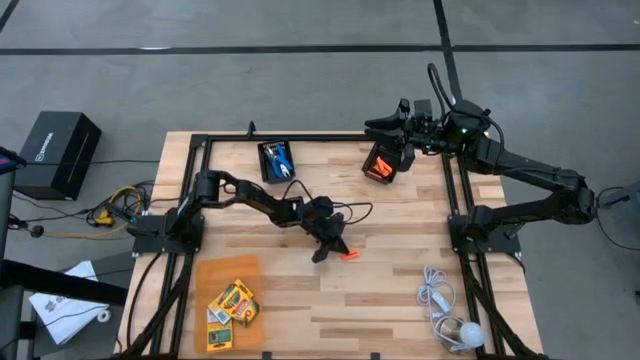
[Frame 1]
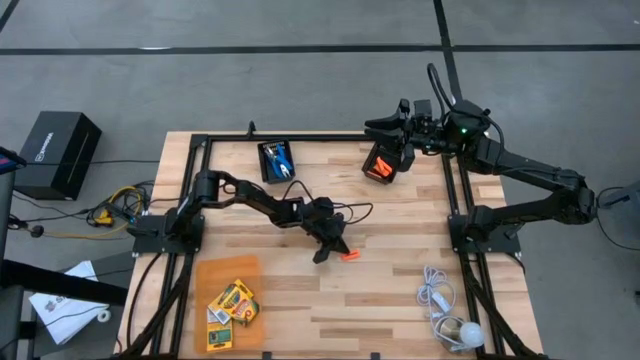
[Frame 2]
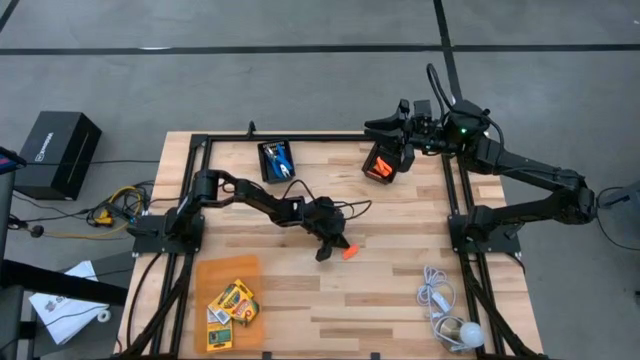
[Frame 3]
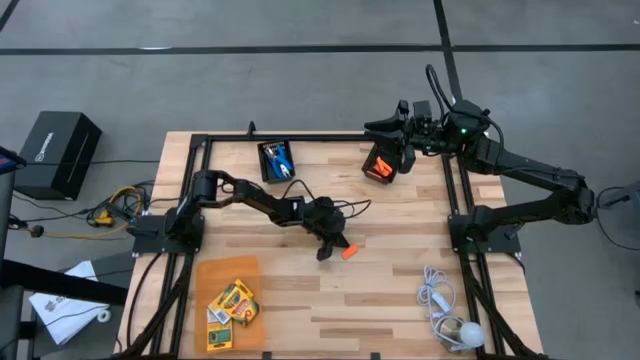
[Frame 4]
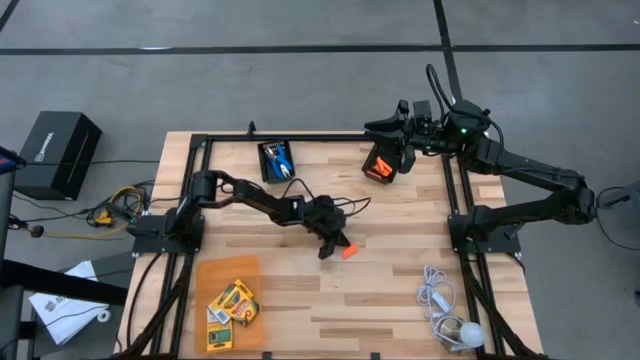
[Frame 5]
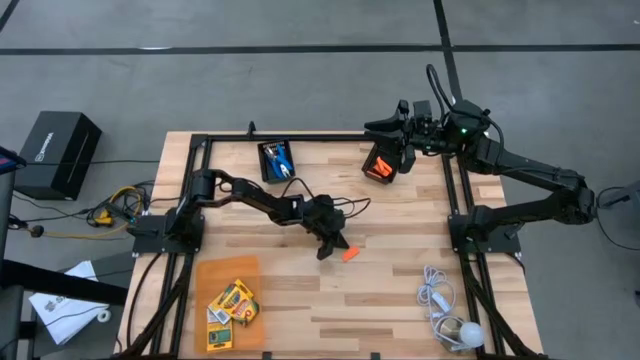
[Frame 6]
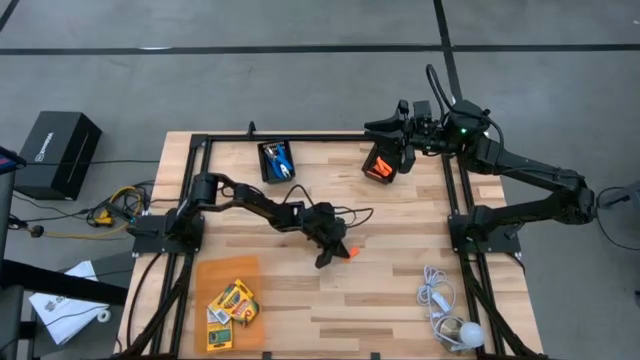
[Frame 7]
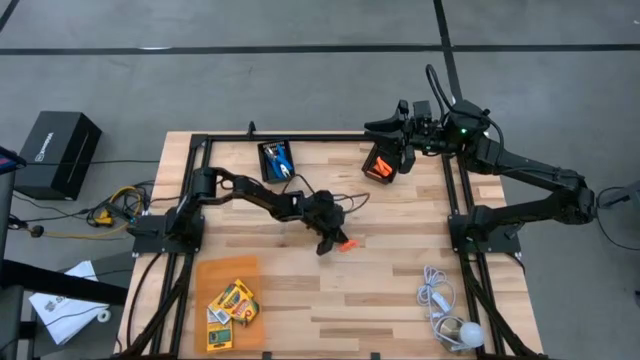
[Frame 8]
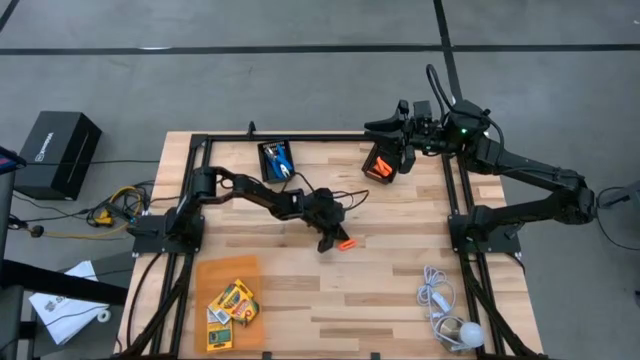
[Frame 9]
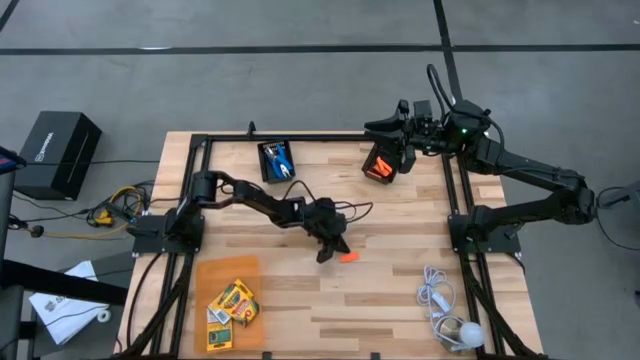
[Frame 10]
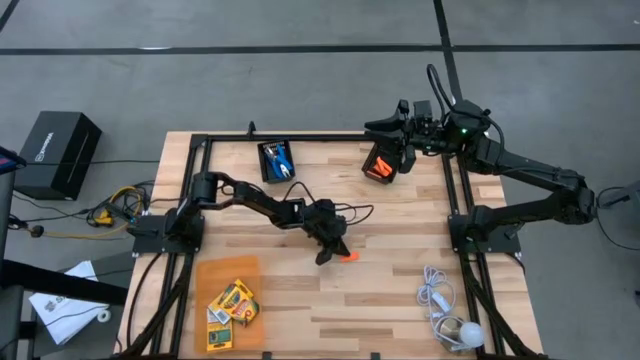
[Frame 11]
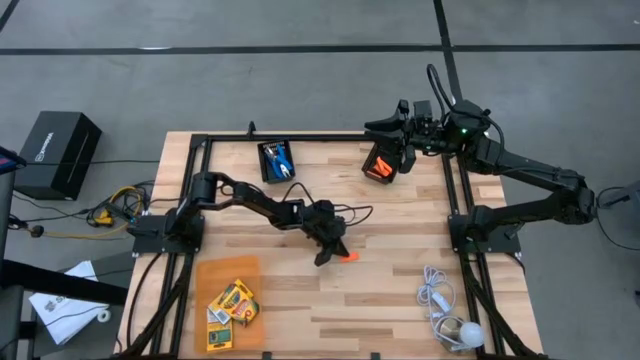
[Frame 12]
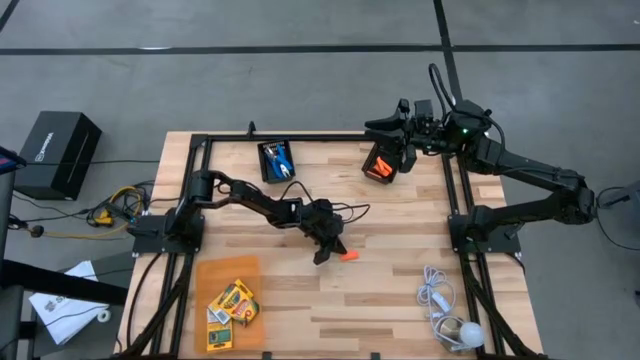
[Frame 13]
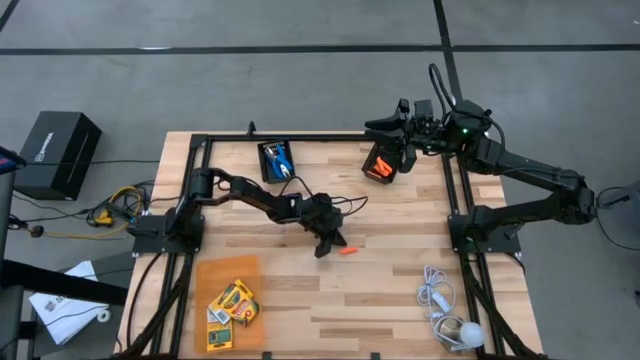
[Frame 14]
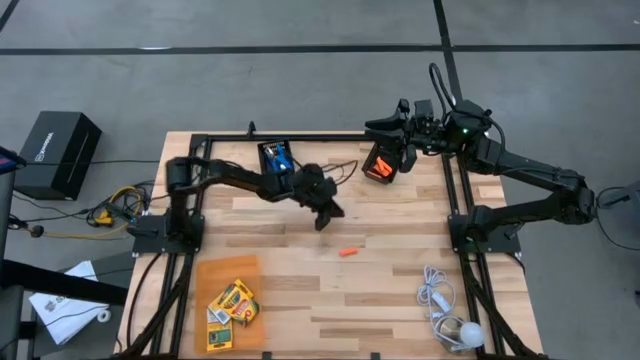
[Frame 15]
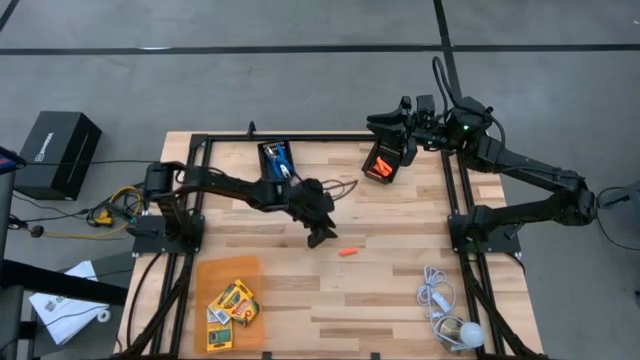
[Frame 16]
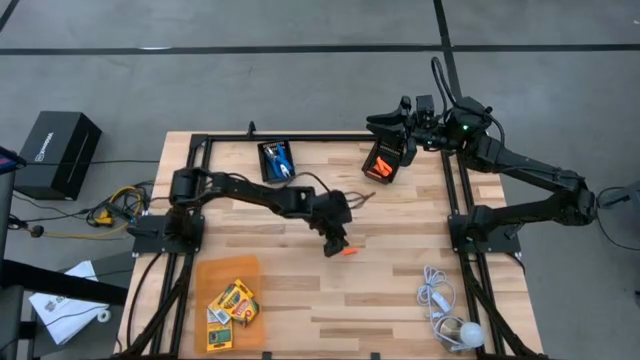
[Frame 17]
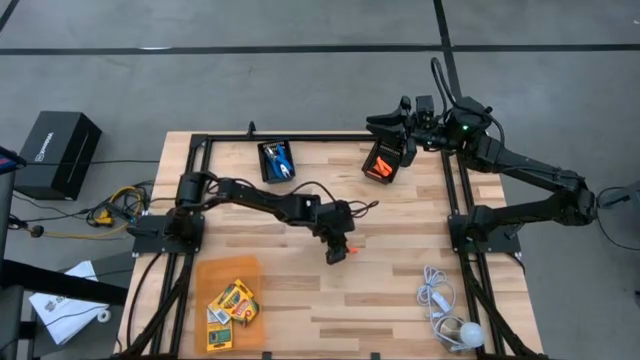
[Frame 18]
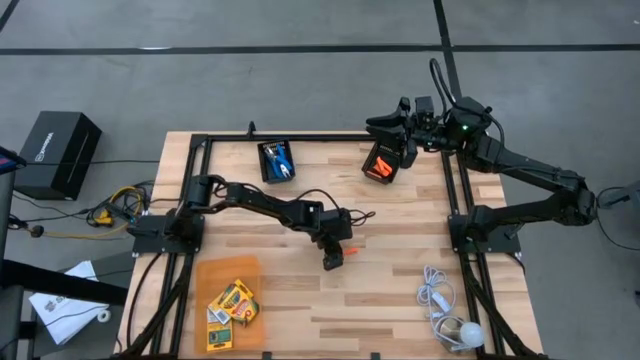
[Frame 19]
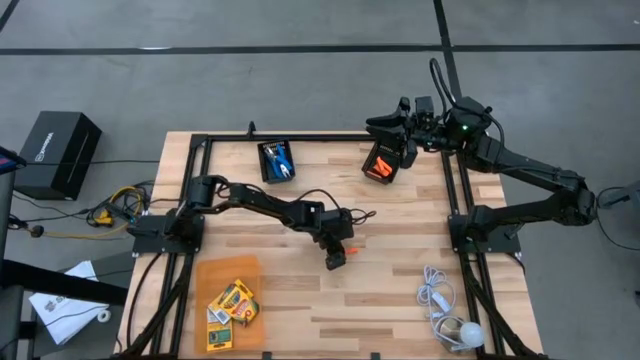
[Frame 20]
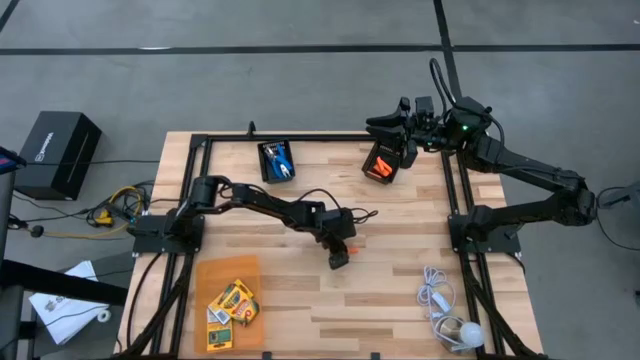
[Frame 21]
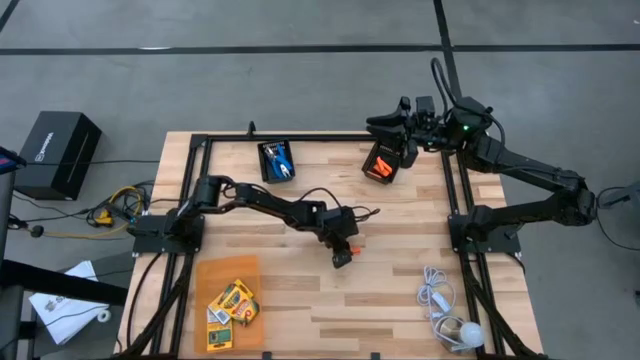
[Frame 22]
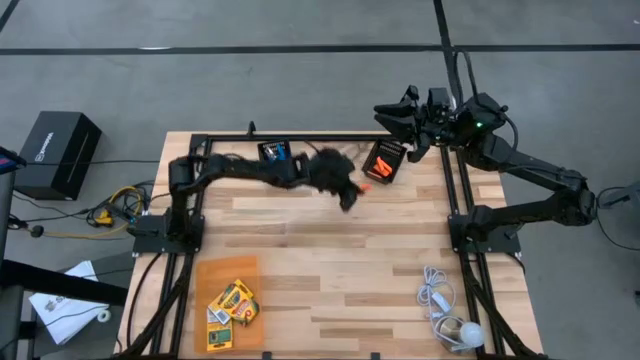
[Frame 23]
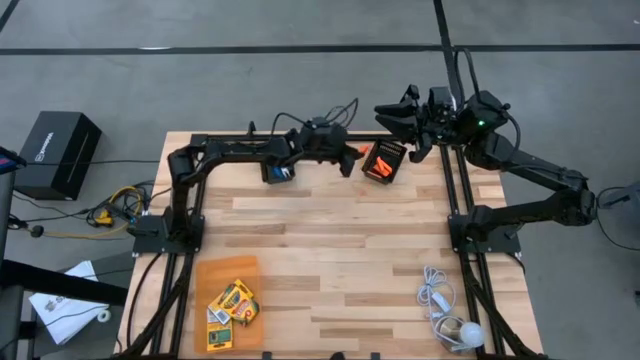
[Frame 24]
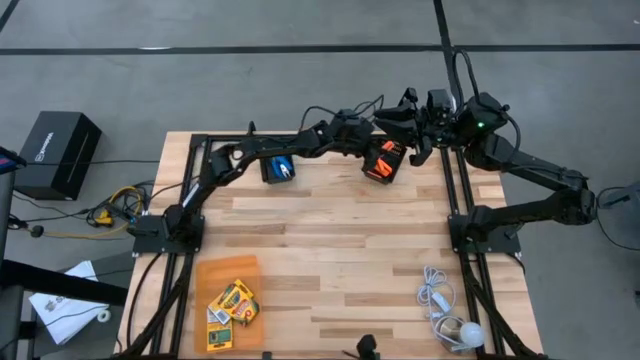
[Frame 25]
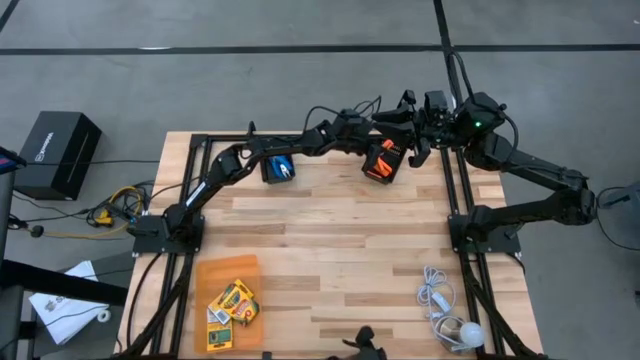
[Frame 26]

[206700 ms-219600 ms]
Task: Pick & Place School Supplies
Put the orange eraser into the right black bin

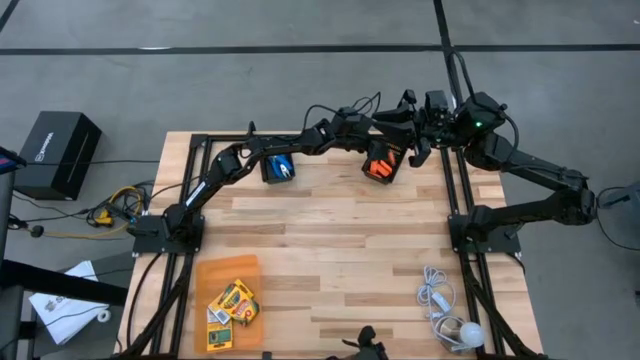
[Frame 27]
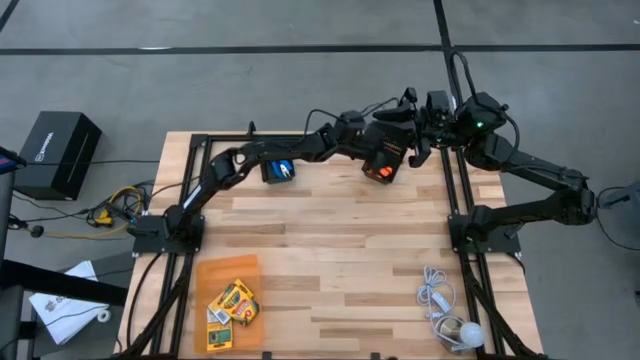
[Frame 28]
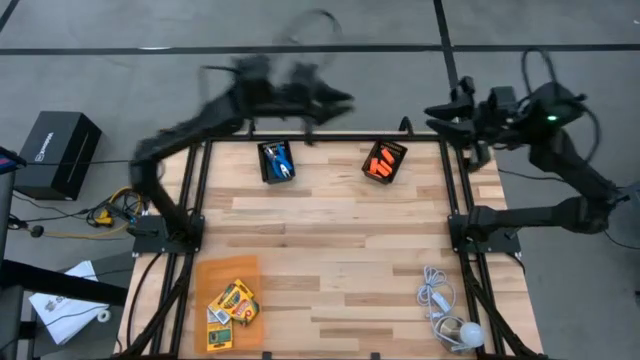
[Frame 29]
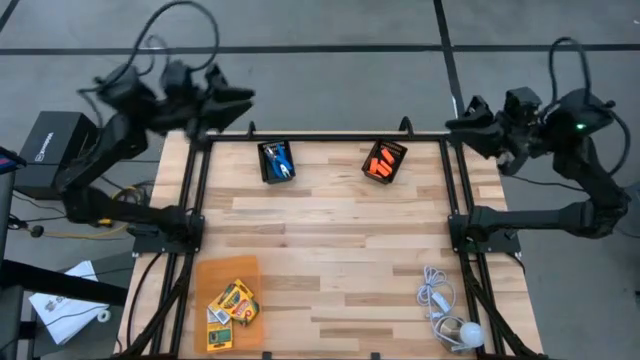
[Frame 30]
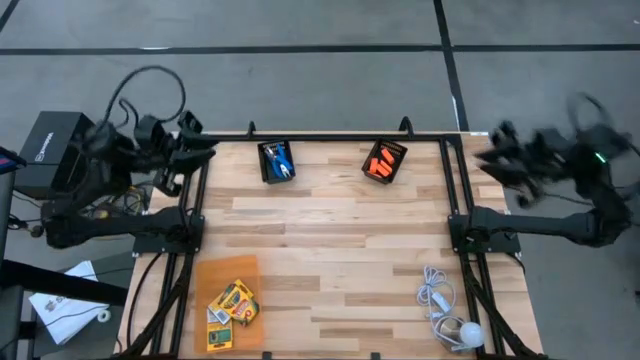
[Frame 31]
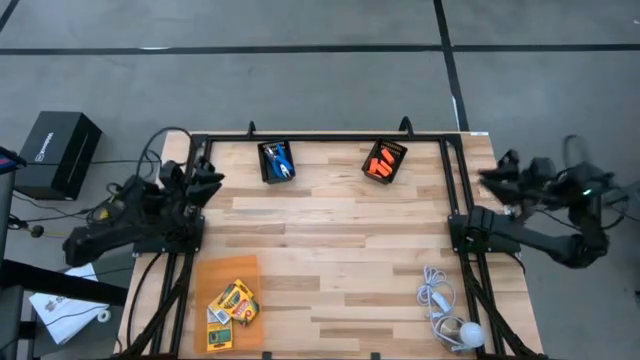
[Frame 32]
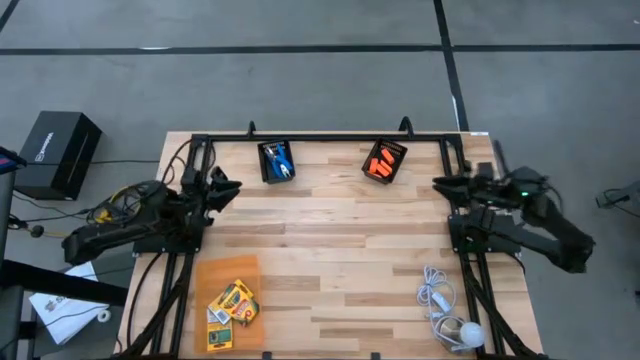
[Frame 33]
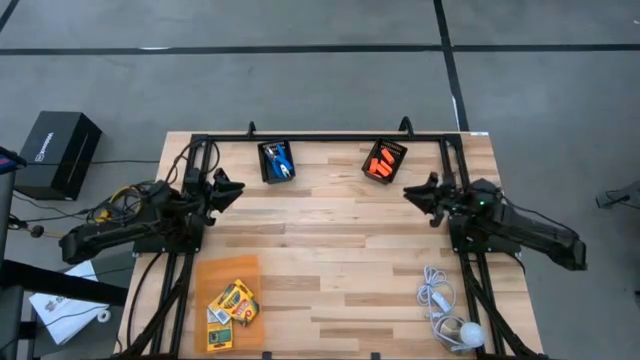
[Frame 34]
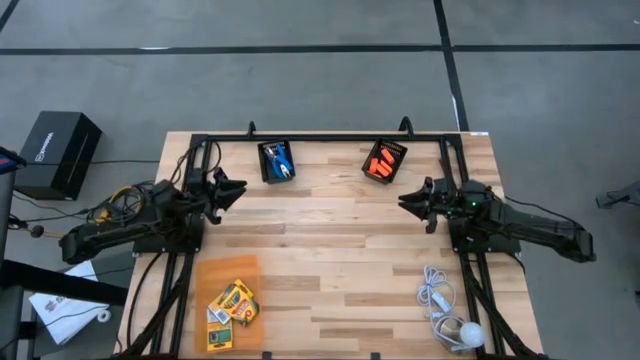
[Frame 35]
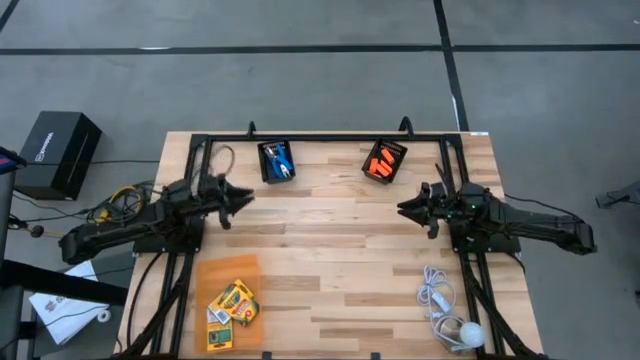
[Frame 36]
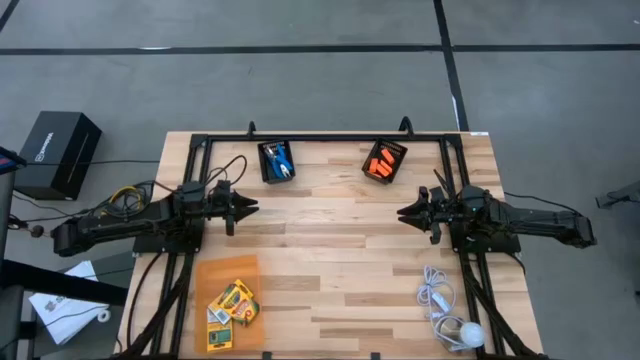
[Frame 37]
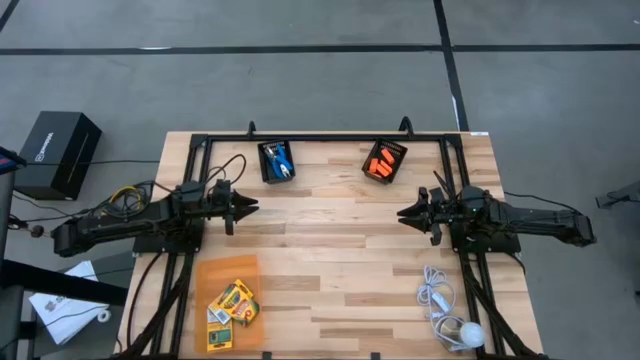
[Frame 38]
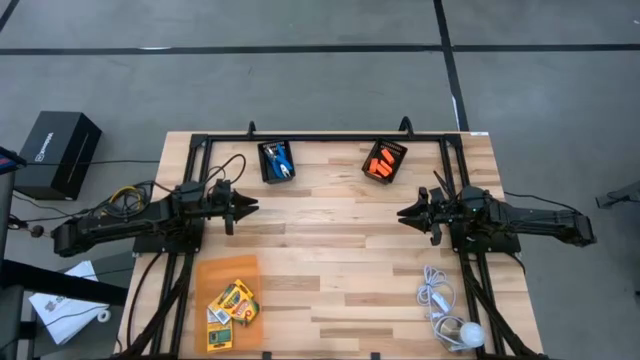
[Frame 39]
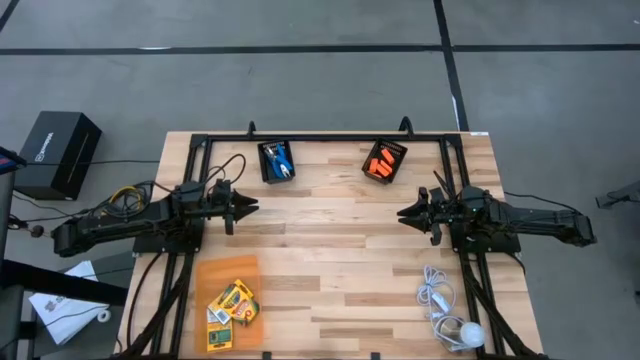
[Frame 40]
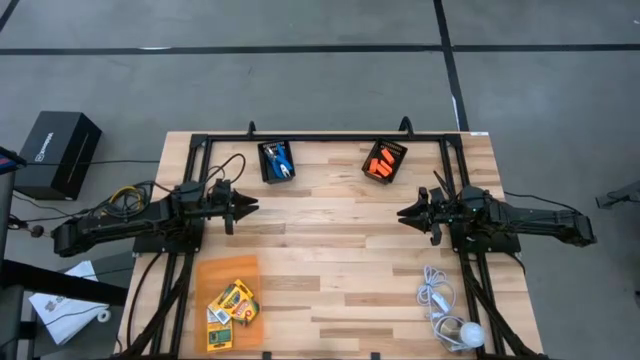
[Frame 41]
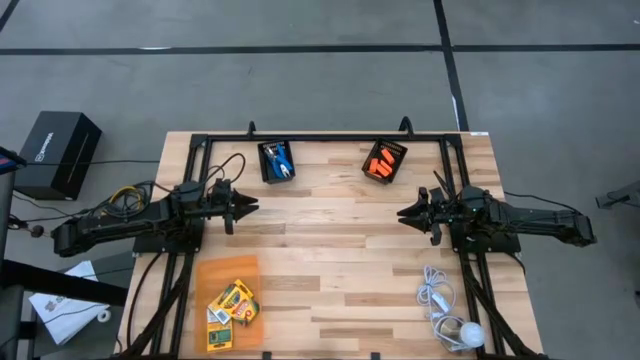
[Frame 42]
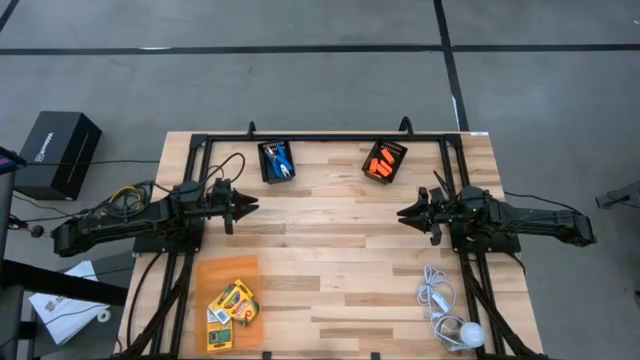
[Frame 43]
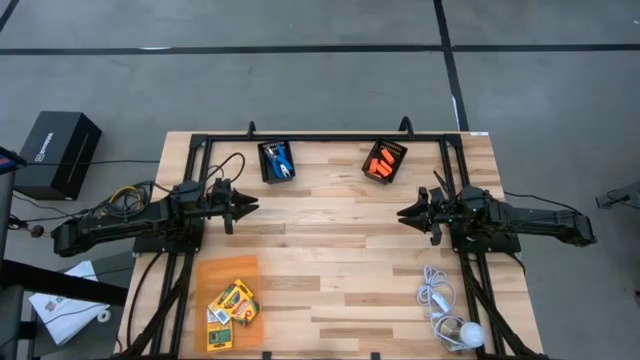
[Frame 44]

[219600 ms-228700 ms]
Return to home position
